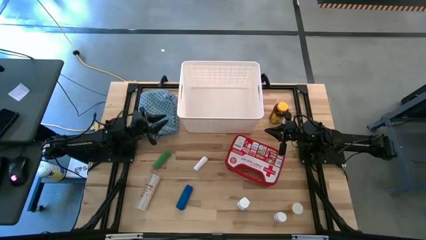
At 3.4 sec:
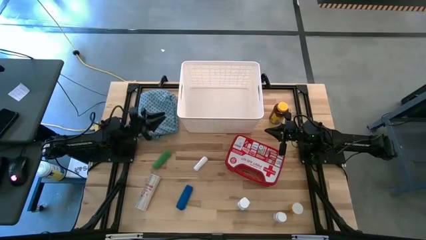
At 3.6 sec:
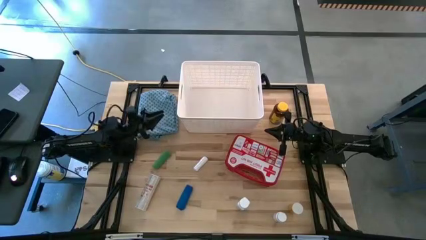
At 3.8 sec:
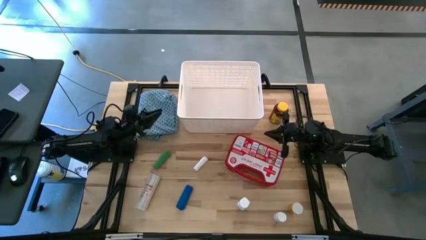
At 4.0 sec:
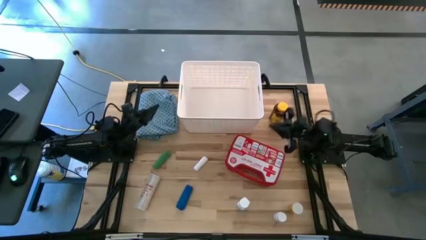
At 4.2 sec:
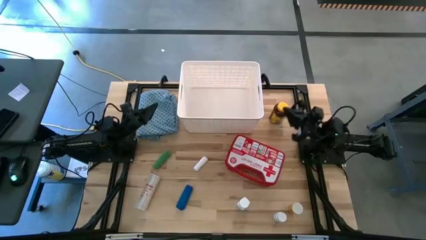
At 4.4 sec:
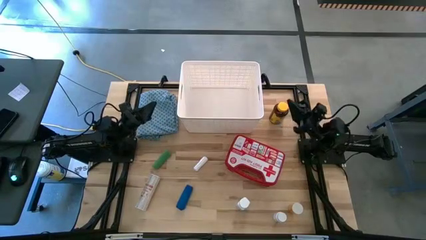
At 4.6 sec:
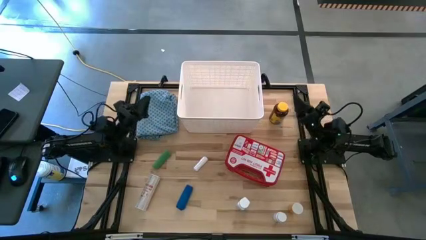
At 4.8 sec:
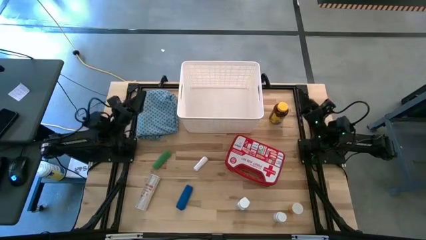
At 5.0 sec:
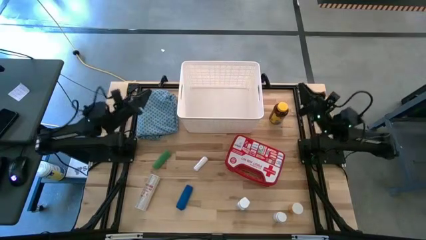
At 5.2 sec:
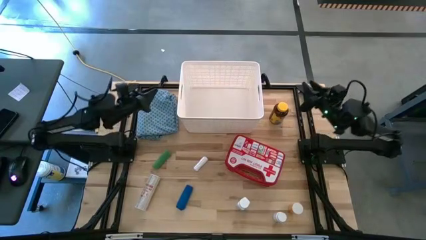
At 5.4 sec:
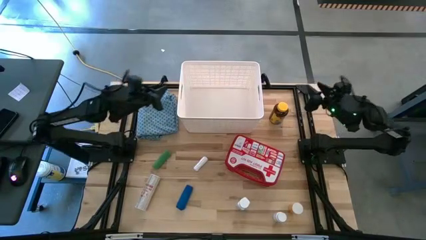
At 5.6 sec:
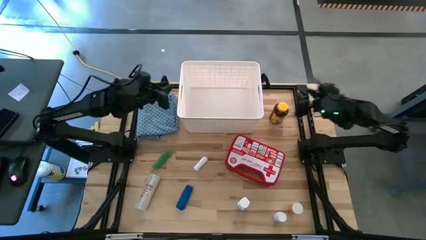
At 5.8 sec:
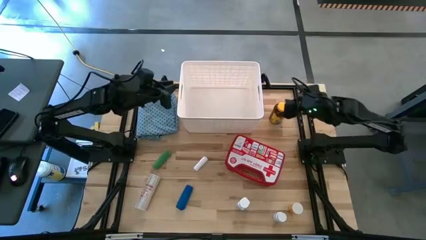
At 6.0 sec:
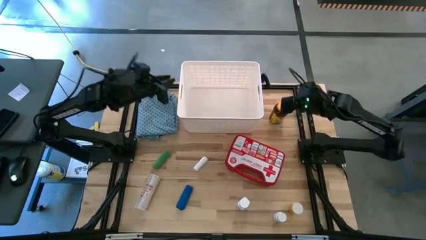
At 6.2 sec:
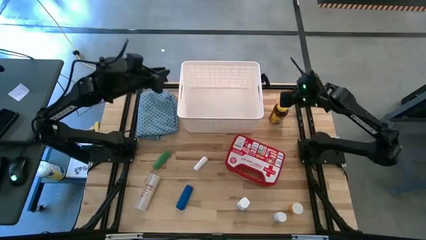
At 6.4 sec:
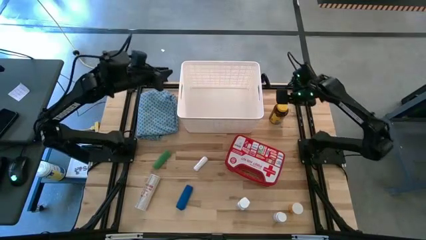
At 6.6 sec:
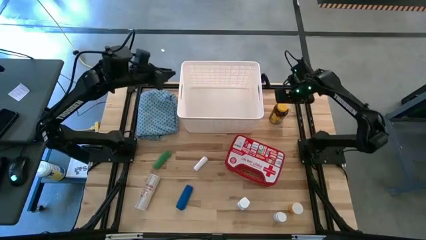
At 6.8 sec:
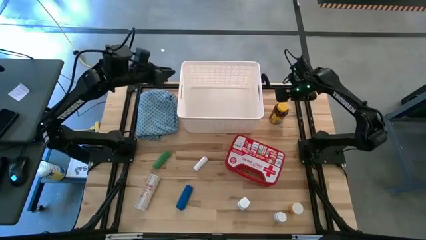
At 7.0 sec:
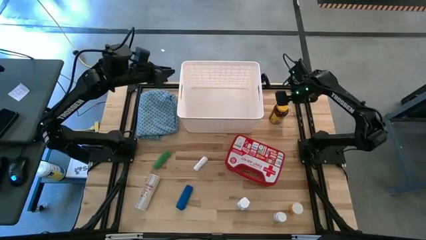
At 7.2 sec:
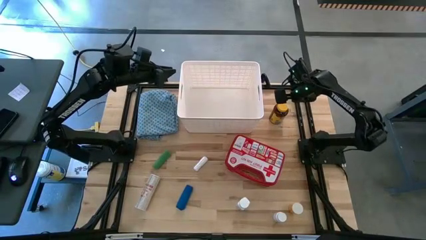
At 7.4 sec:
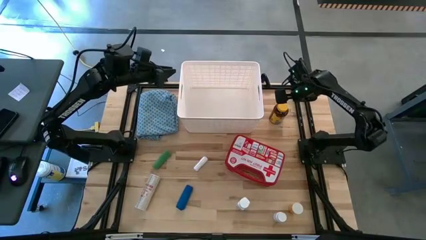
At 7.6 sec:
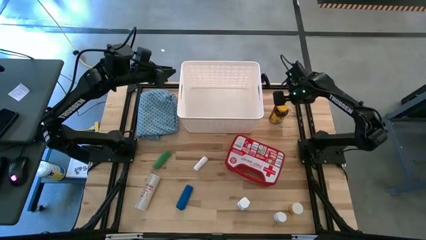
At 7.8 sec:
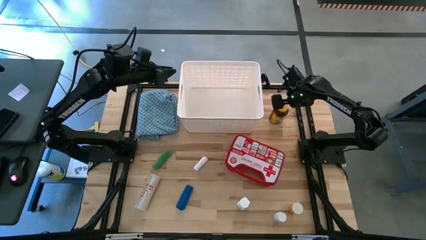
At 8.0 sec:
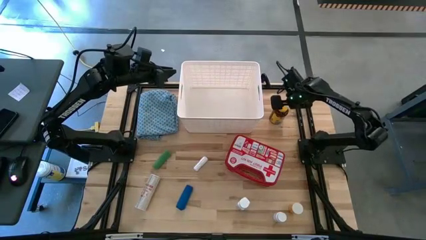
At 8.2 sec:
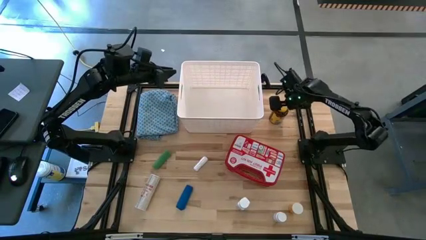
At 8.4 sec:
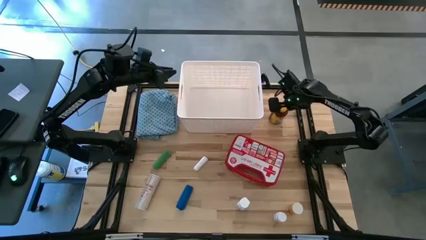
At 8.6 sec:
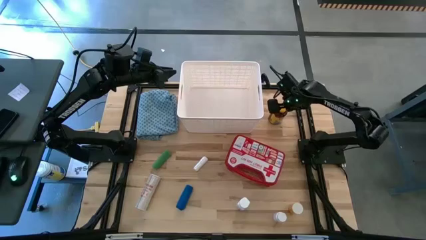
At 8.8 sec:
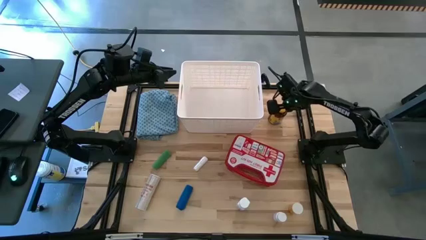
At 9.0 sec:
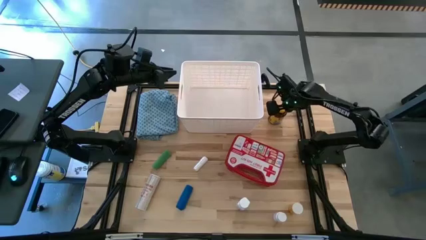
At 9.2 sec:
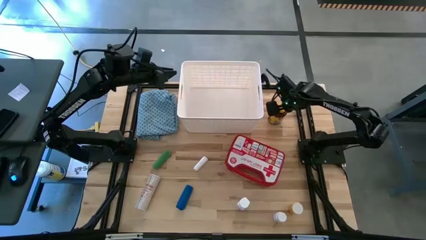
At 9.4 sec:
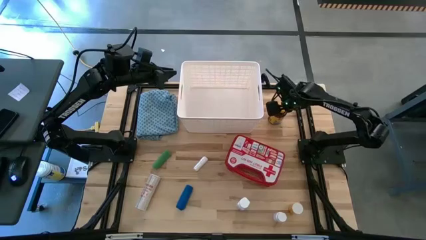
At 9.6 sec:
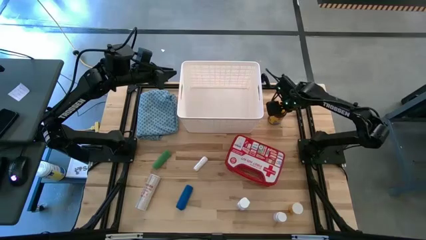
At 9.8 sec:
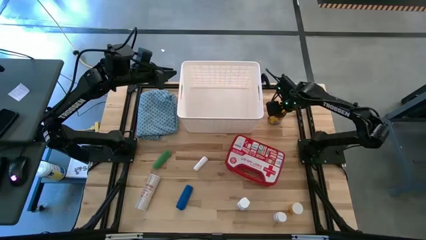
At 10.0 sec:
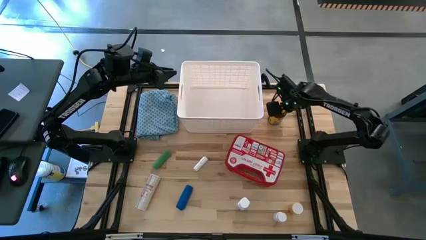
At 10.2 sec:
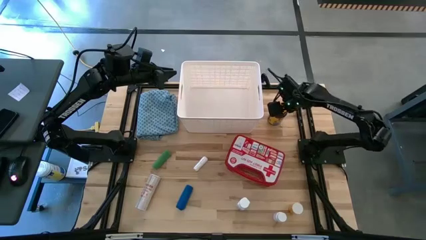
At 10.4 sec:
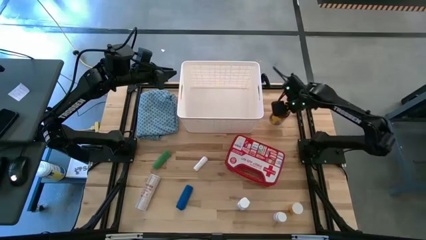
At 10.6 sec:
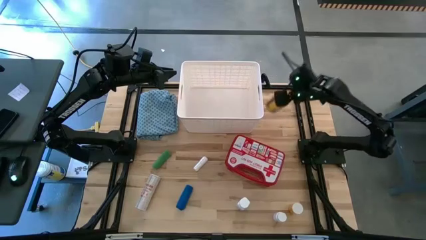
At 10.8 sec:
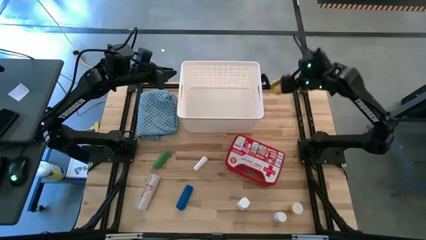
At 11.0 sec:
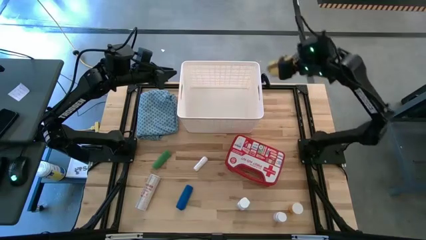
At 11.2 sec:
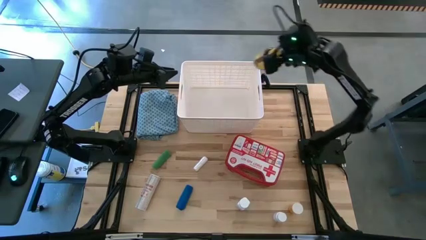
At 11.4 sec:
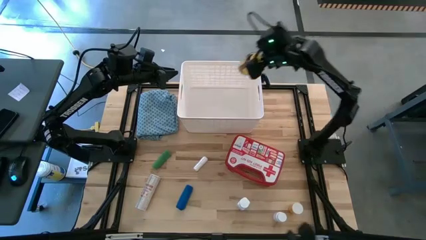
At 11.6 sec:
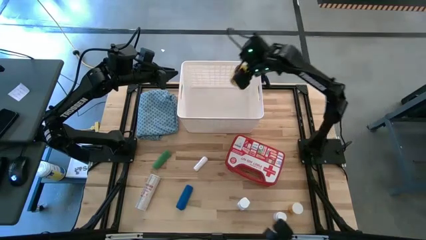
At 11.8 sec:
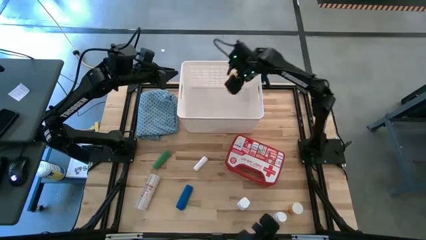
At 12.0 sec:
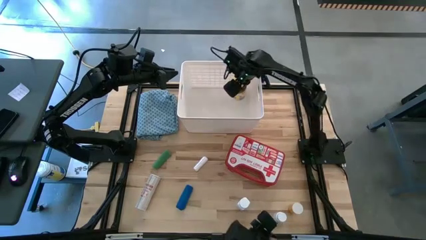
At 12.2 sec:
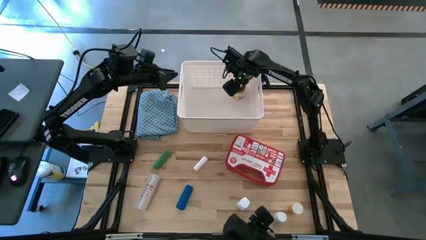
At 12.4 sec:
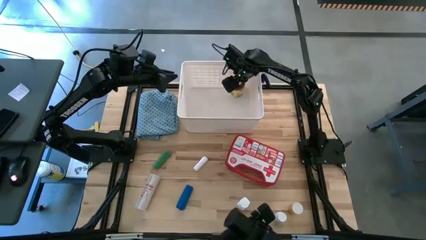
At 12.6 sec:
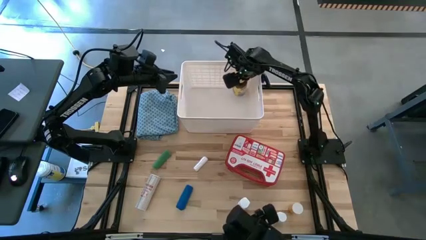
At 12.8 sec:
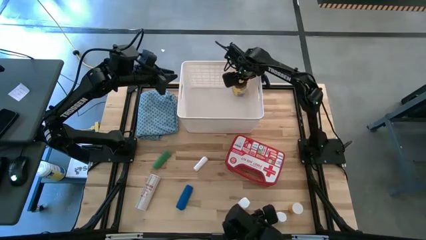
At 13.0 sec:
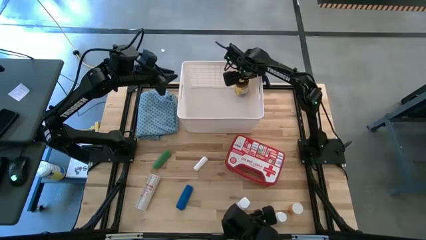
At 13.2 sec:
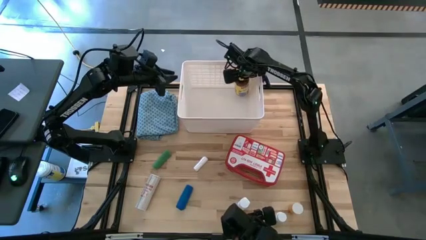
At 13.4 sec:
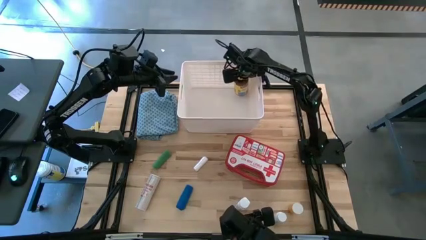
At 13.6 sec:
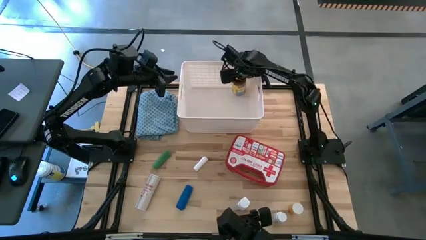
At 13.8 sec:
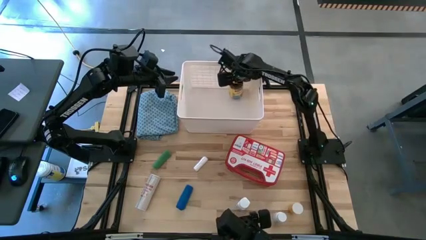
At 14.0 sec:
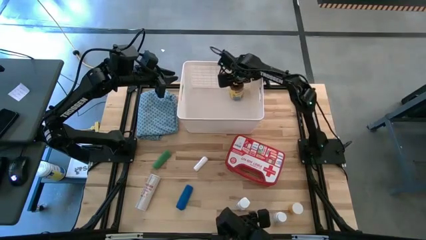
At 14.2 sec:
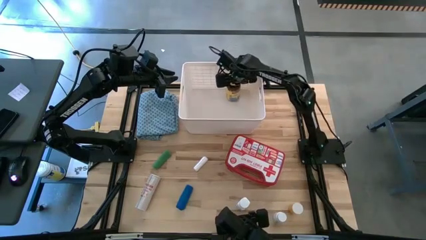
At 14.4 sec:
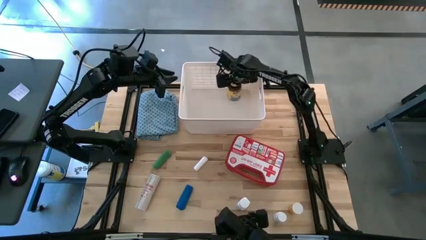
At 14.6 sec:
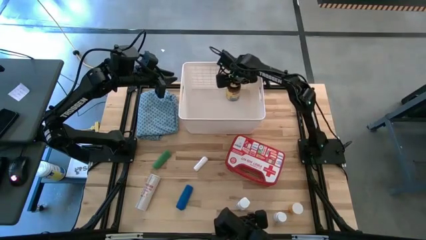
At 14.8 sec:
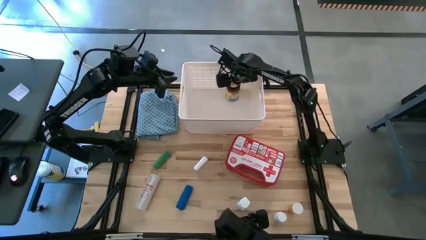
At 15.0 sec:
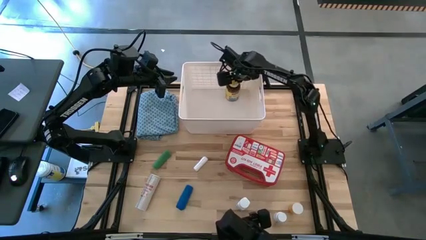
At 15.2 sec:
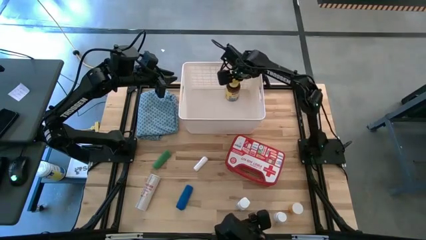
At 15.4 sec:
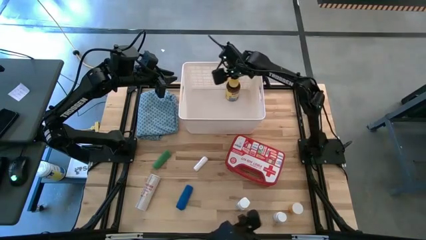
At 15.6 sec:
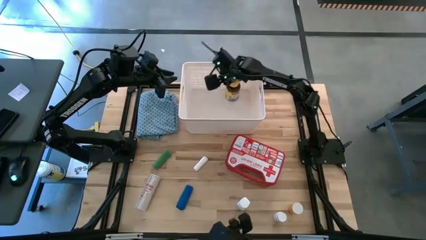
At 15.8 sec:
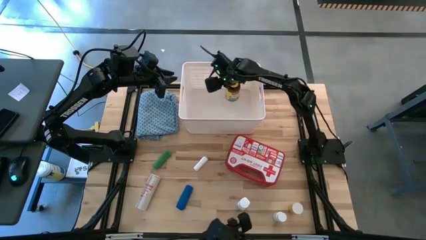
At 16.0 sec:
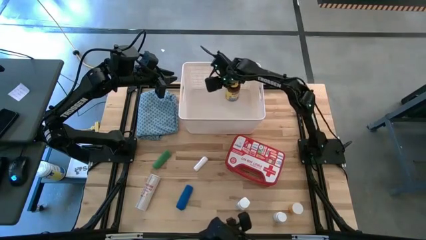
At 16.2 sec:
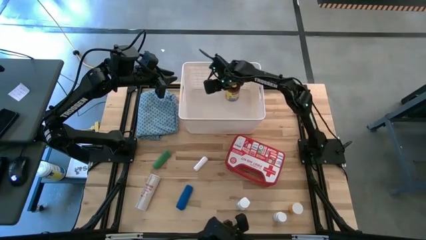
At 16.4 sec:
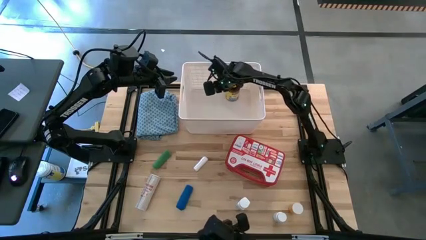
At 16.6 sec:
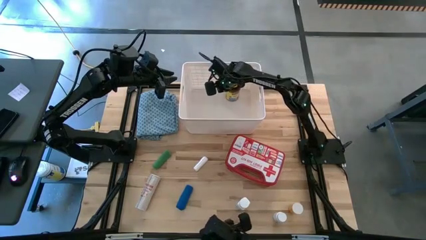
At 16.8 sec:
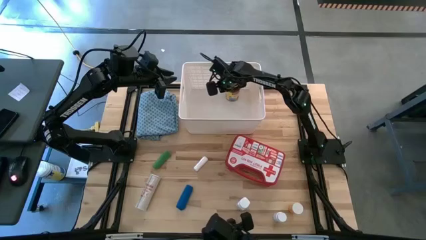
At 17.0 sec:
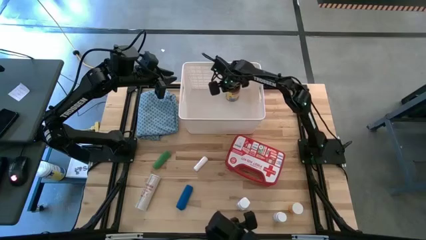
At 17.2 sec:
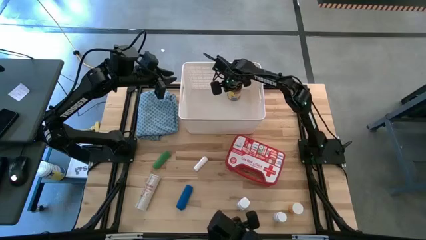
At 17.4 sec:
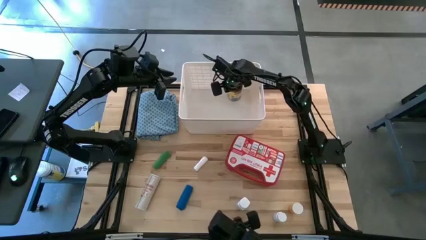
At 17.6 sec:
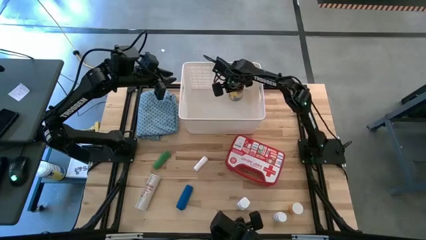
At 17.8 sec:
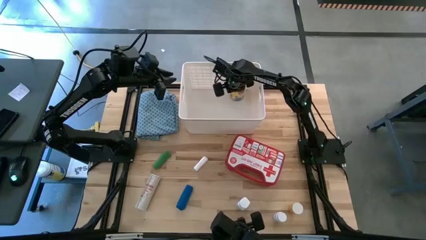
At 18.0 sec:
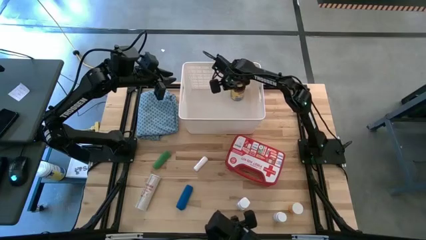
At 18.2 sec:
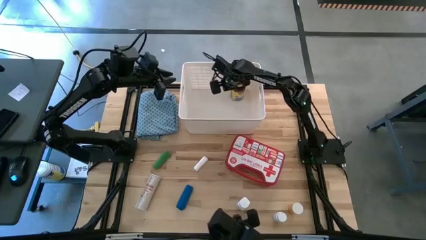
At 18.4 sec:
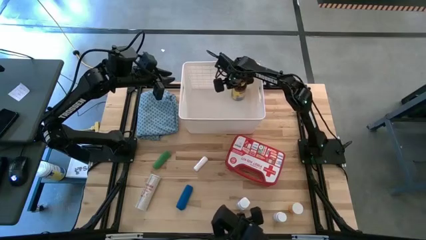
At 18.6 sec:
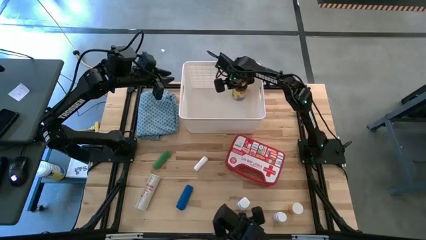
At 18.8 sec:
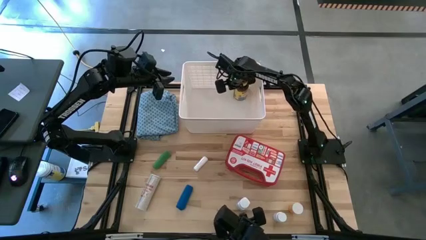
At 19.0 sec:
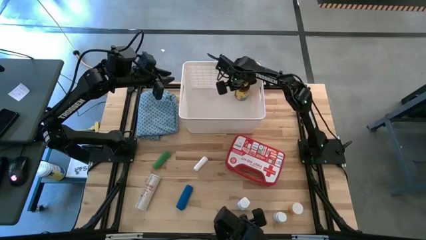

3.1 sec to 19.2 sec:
Task: Pick & place medical supplies in basket/bin
Put the yellow pill bottle into the white bin
